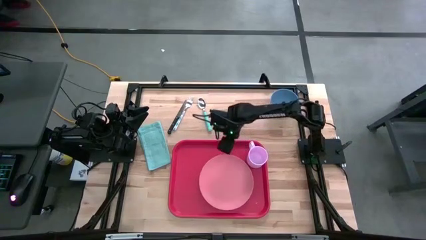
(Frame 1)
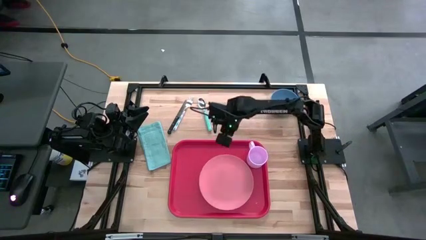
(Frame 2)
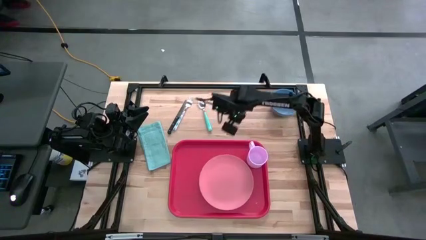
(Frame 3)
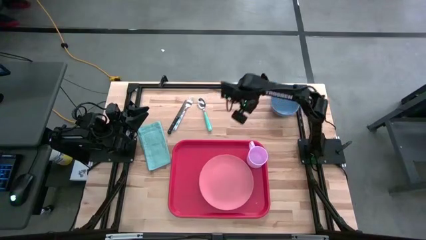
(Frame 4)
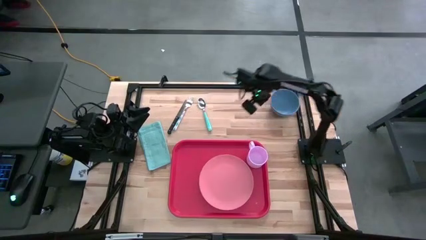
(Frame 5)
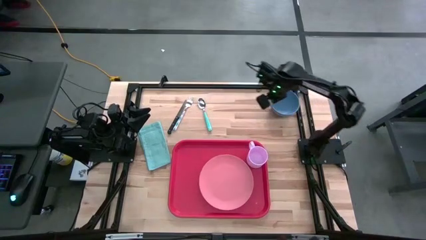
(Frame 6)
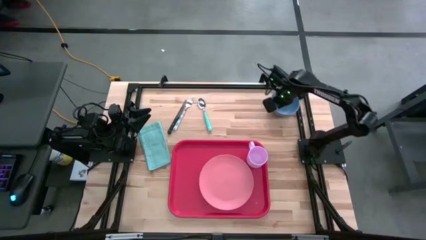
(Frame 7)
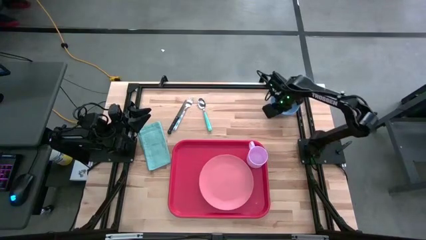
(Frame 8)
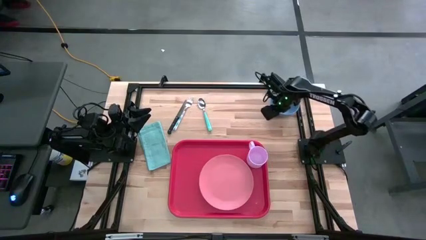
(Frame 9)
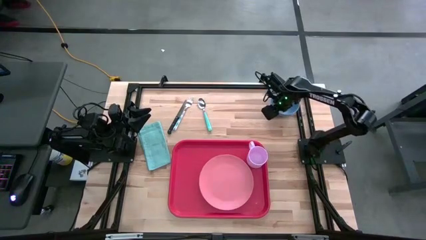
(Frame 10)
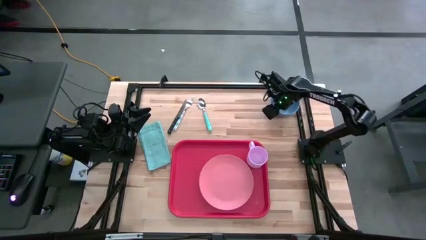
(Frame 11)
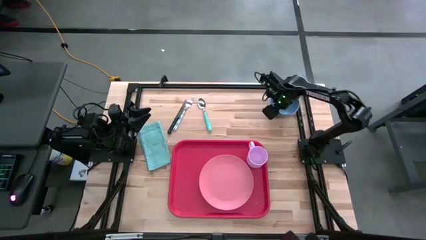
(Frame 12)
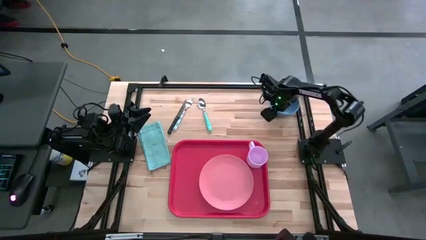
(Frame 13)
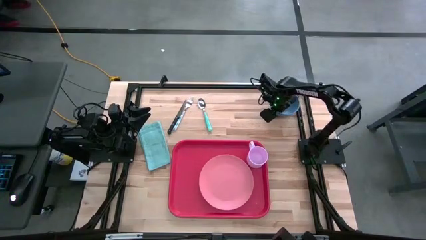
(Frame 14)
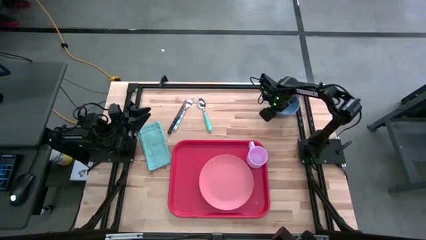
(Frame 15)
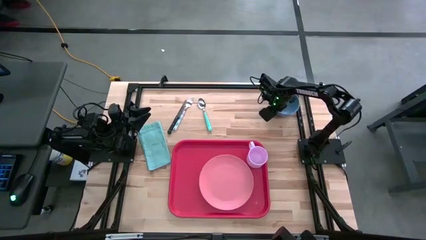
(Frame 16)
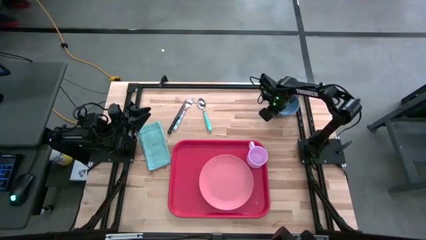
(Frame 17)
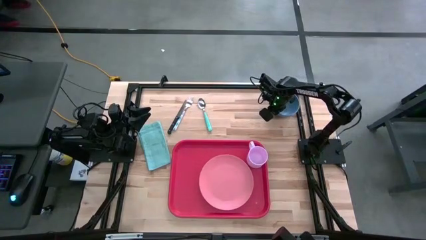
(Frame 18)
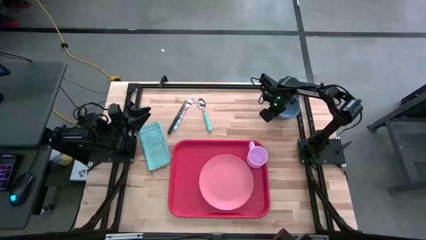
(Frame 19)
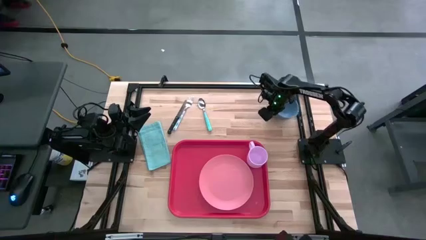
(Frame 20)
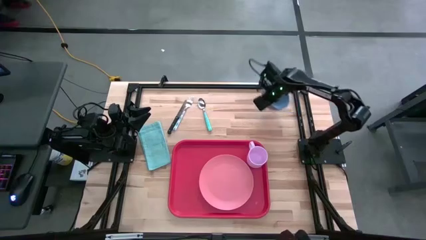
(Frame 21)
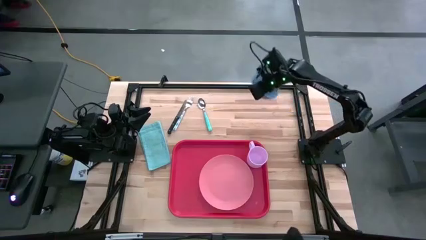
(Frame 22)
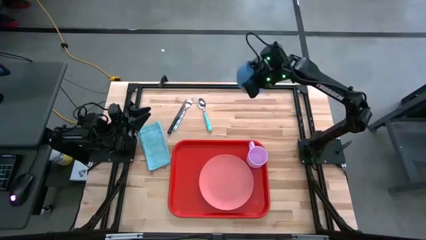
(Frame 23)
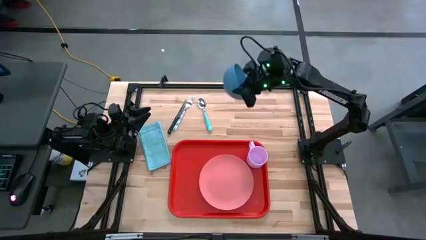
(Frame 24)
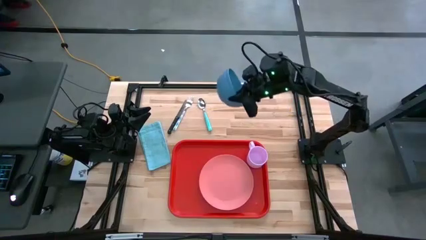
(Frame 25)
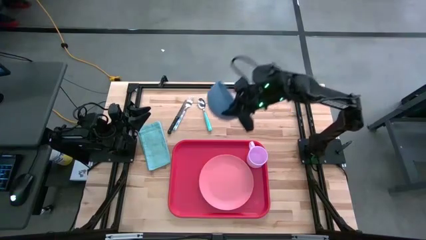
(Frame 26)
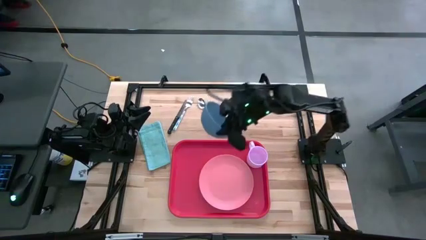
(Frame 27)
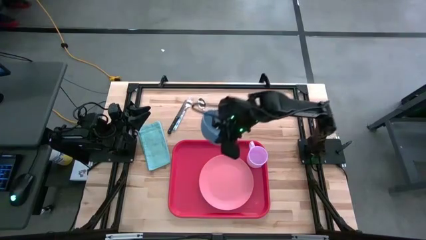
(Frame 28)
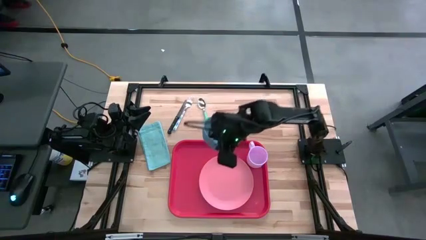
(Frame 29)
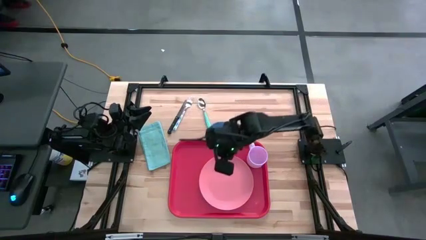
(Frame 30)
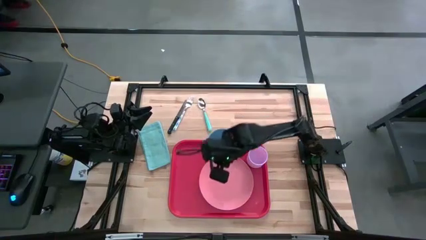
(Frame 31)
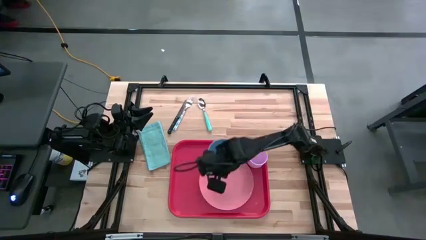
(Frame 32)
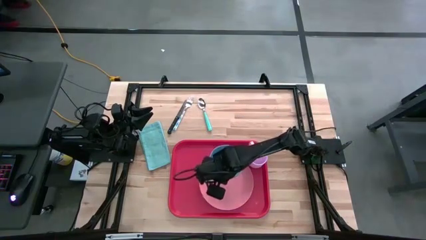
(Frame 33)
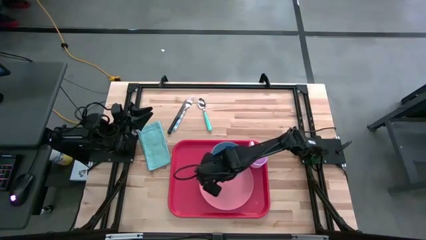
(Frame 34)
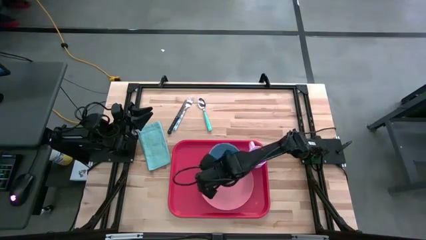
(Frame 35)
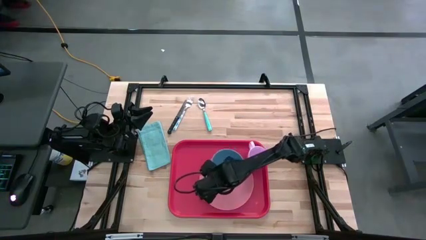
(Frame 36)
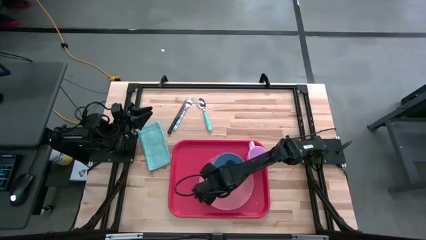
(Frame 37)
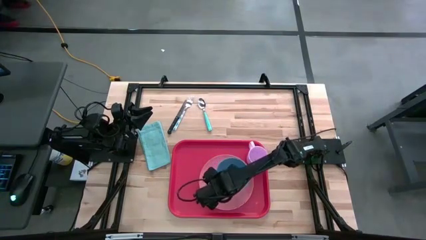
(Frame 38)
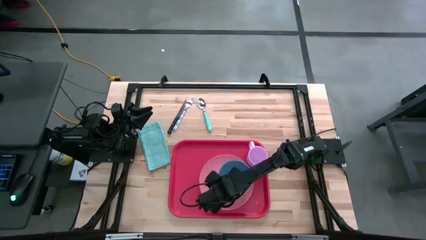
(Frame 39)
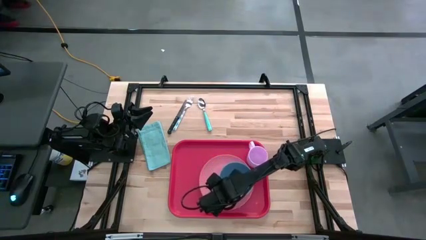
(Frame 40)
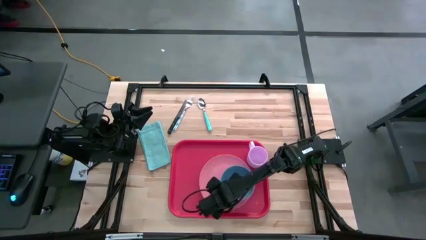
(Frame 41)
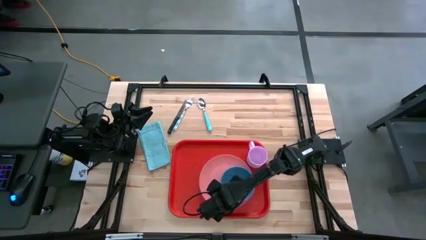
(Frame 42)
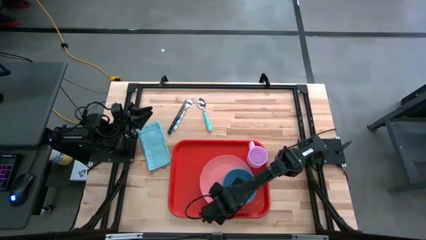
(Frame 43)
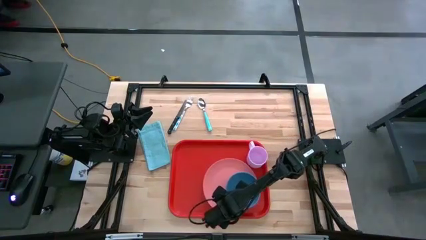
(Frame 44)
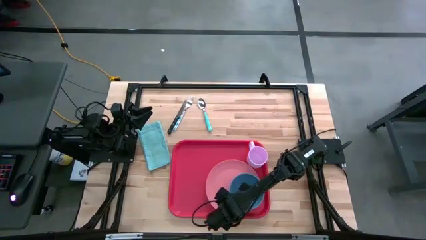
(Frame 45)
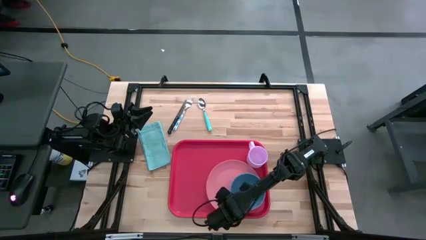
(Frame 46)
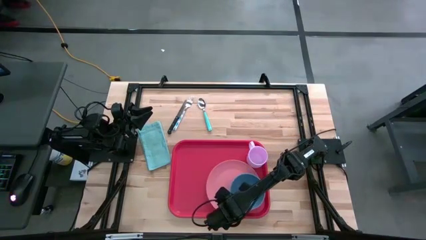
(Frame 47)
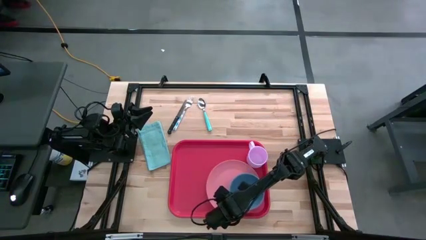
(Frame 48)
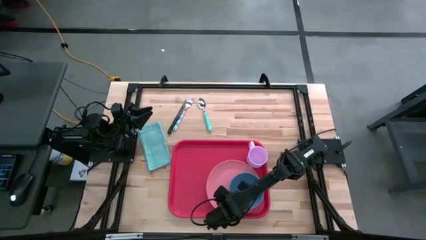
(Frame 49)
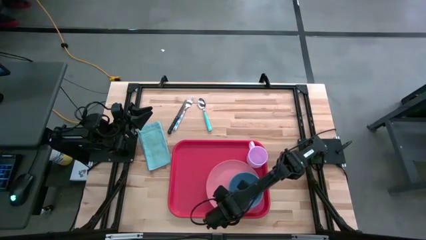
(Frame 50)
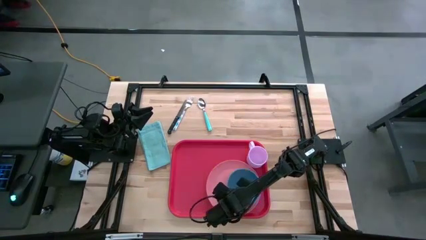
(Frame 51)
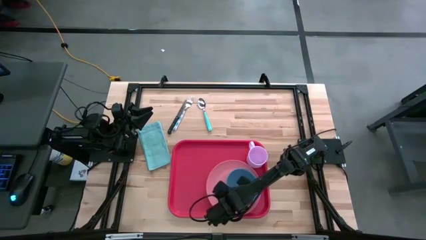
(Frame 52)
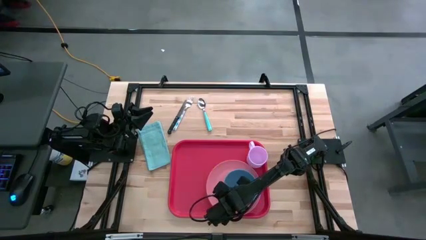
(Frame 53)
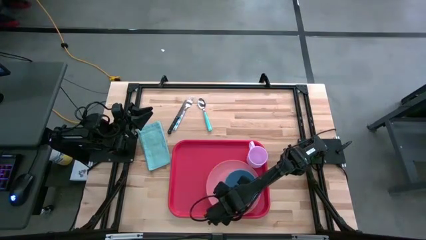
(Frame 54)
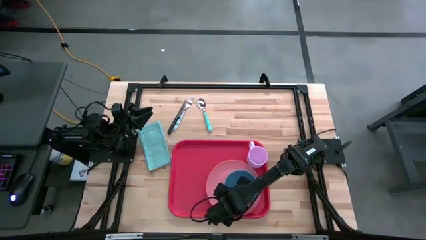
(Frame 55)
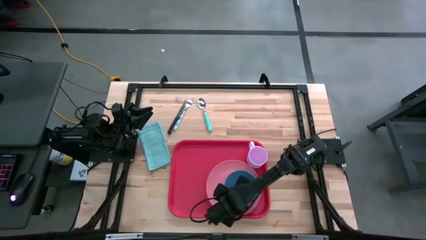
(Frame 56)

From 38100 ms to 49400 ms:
Task: Set up tray
Put the blue bowl on top of the pink plate

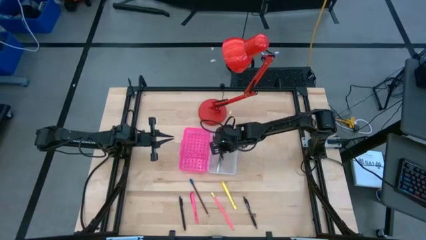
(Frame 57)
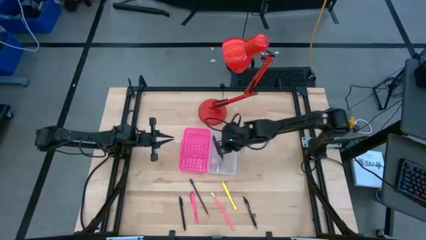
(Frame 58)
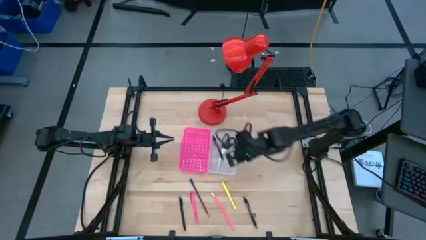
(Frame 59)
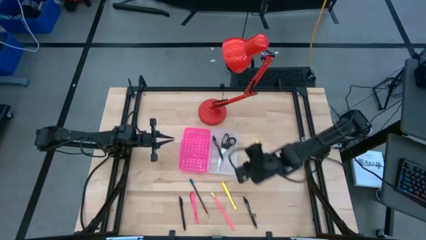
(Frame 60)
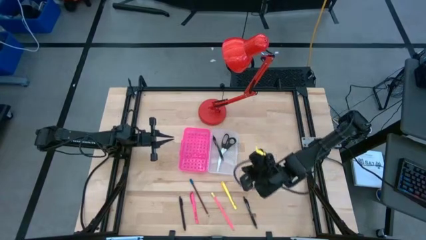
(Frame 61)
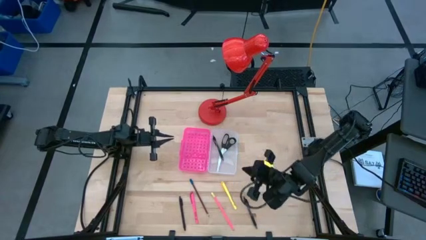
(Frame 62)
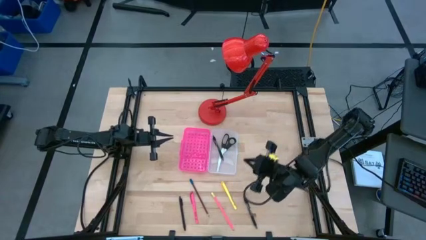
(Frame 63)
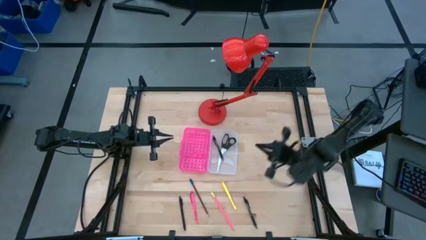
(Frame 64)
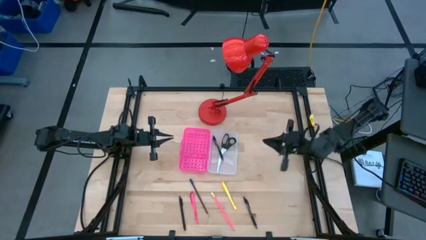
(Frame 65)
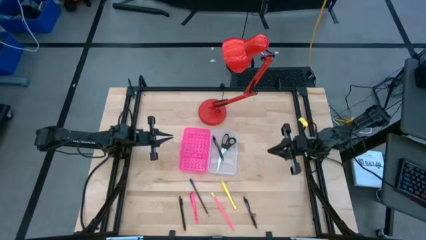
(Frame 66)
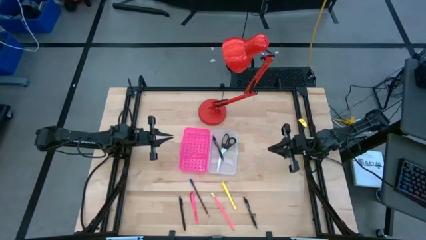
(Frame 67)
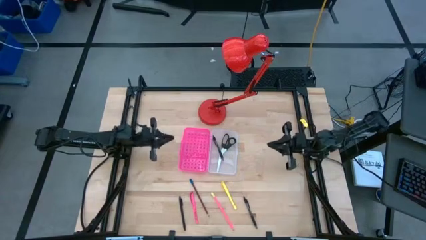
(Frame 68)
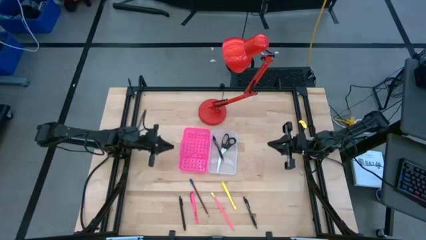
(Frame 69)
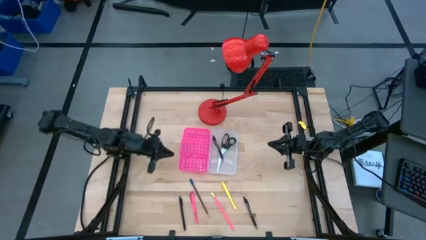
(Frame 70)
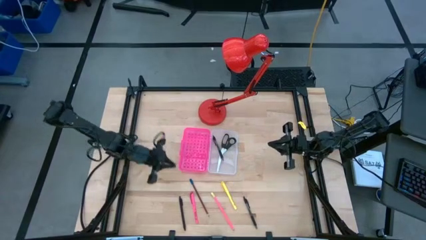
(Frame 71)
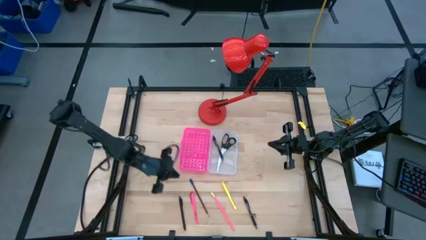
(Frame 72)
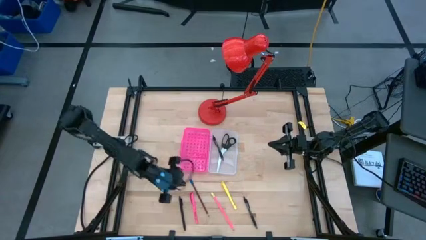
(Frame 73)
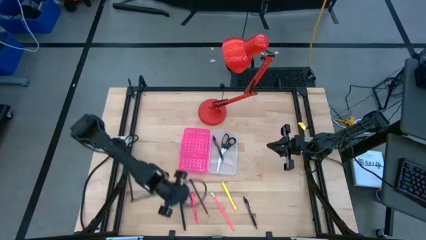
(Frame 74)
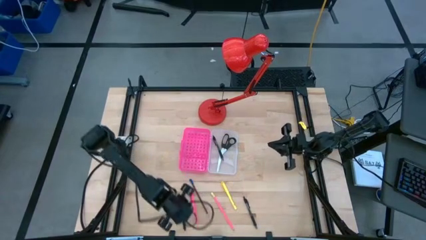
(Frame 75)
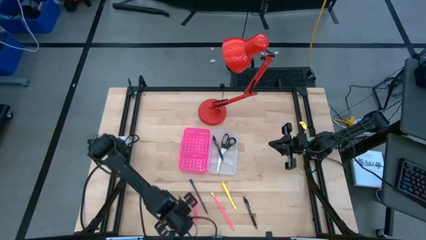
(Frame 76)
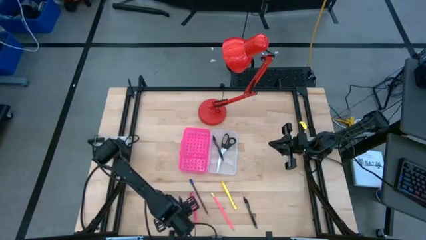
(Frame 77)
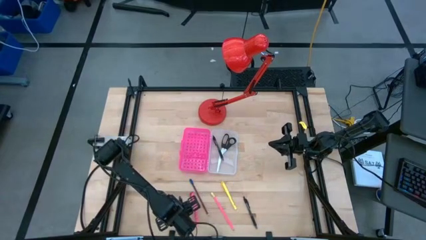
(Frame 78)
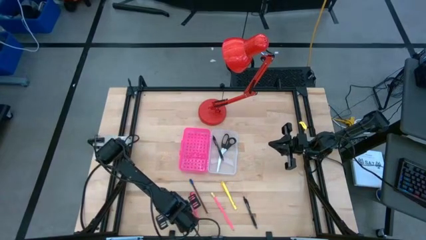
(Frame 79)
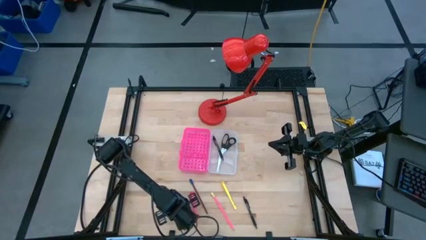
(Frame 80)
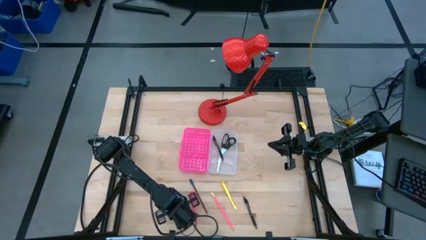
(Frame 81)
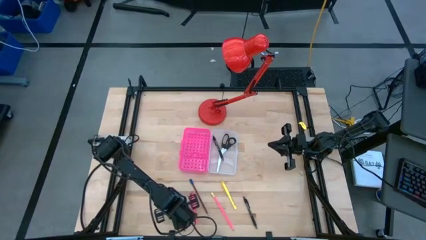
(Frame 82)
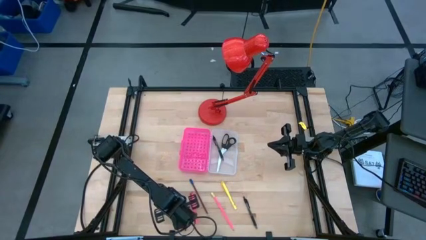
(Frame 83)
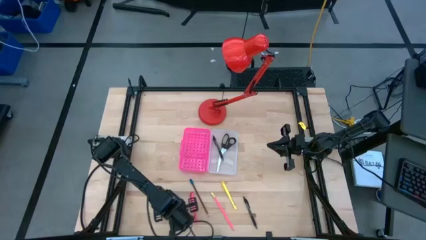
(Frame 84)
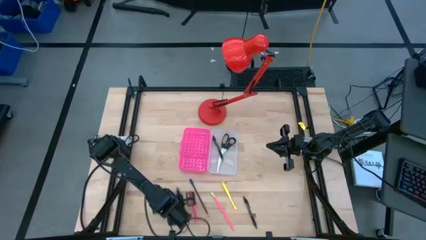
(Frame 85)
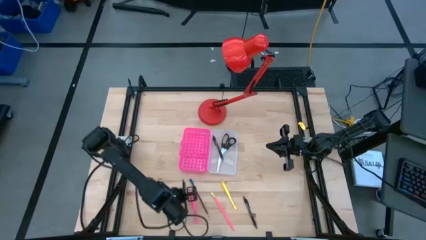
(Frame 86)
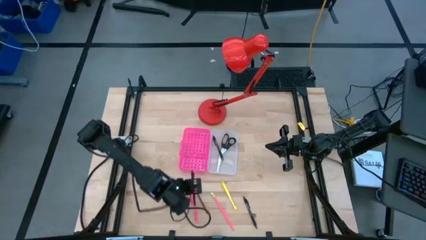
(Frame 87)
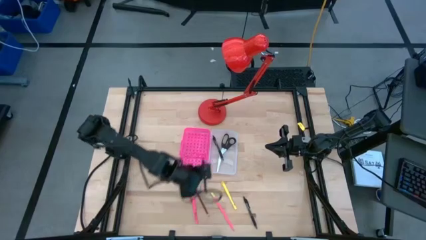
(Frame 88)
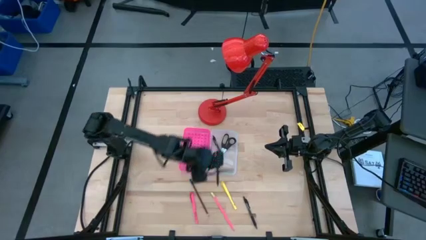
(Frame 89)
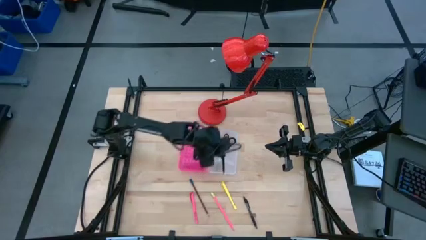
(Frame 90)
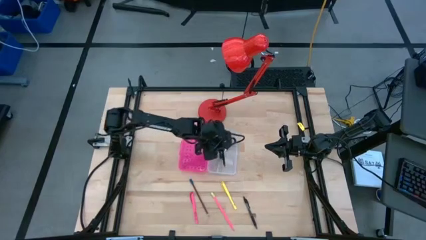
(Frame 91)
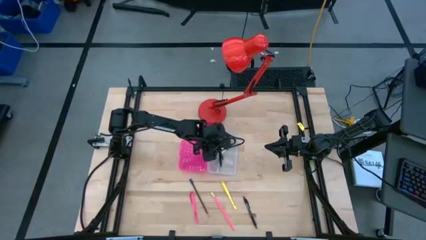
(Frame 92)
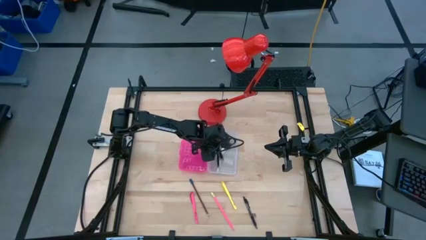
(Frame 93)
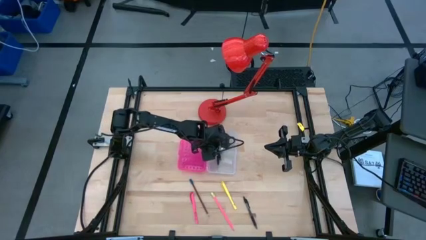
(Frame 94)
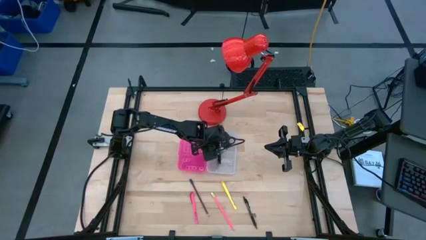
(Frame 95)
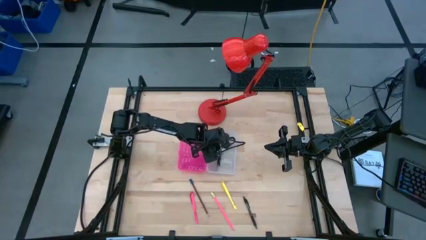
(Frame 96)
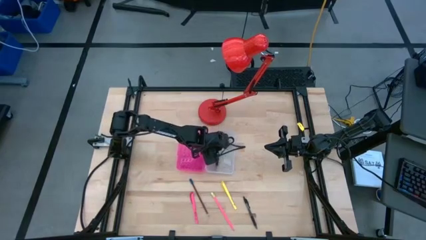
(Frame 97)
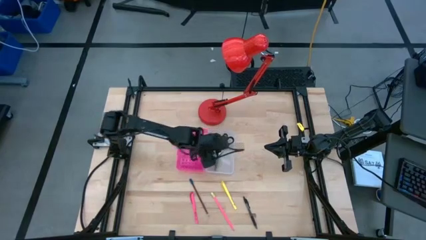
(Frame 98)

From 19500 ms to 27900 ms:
Task: Pick & place school supplies into a supply box
Put the left black pen into the supply box
